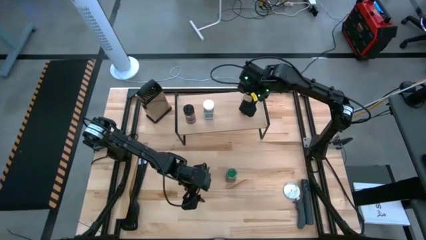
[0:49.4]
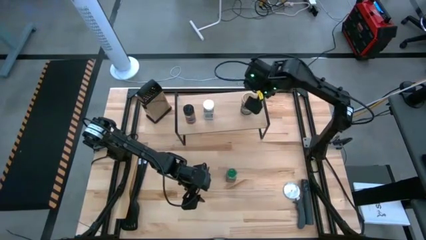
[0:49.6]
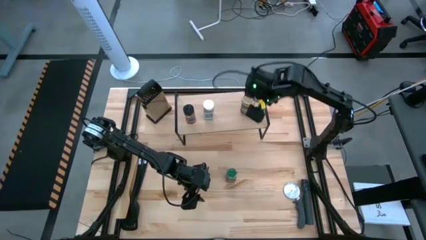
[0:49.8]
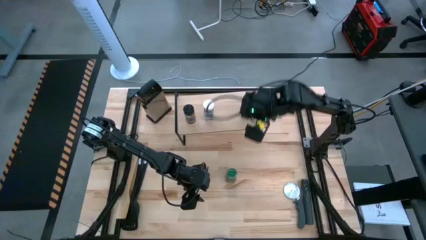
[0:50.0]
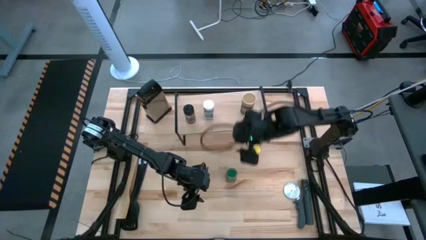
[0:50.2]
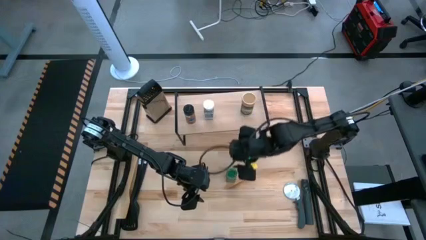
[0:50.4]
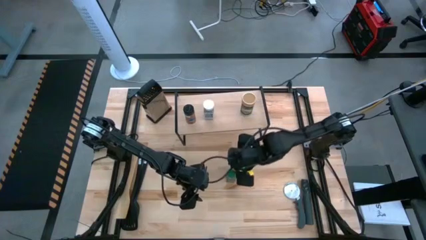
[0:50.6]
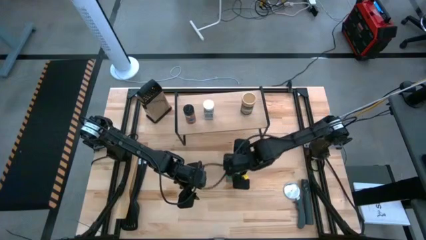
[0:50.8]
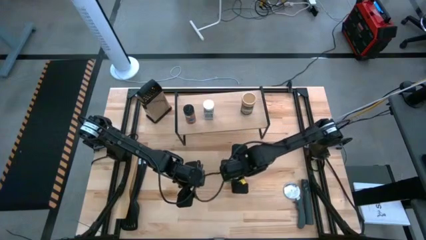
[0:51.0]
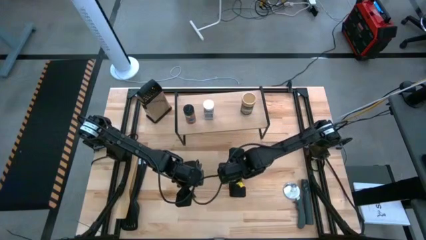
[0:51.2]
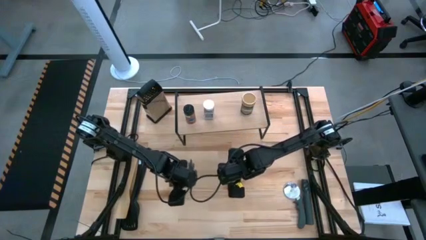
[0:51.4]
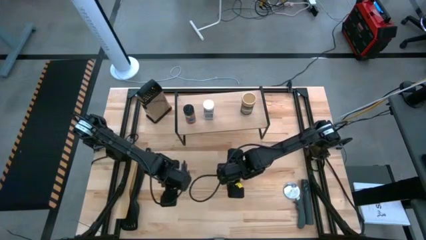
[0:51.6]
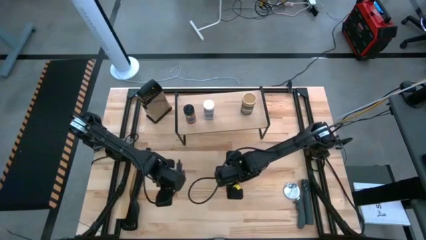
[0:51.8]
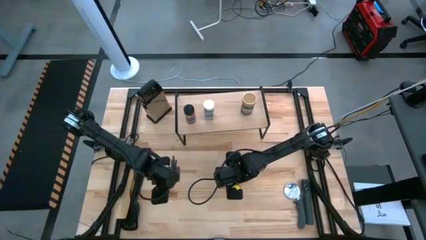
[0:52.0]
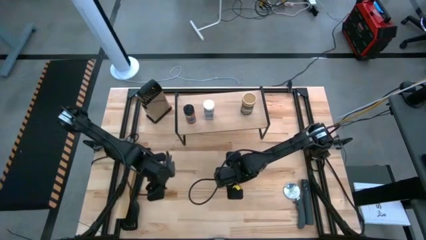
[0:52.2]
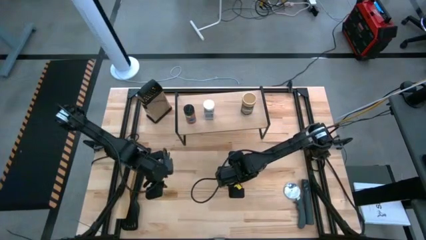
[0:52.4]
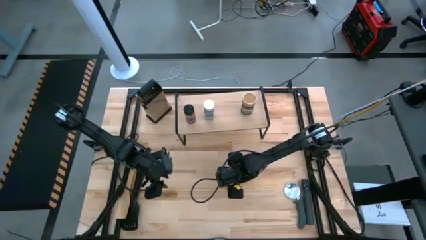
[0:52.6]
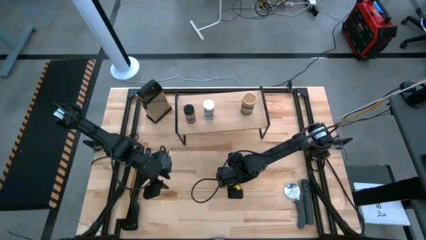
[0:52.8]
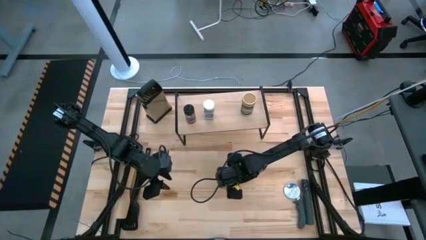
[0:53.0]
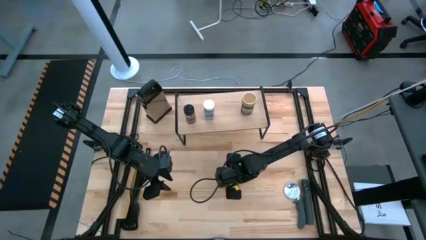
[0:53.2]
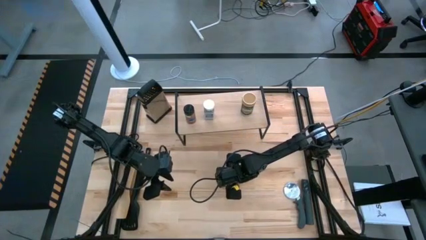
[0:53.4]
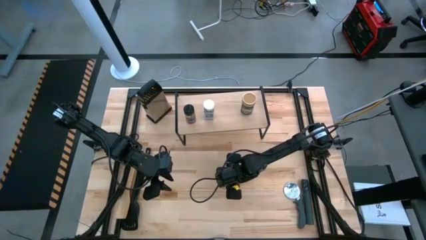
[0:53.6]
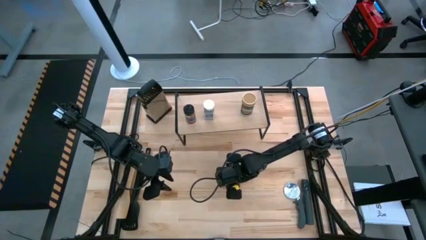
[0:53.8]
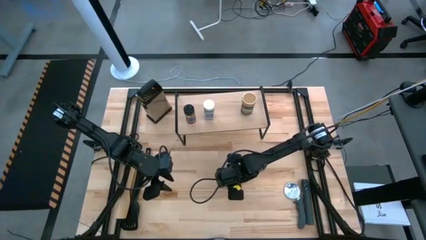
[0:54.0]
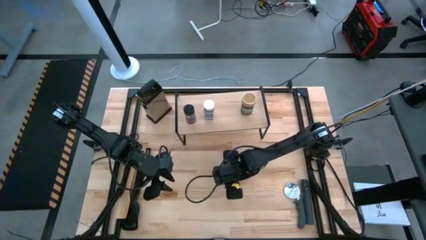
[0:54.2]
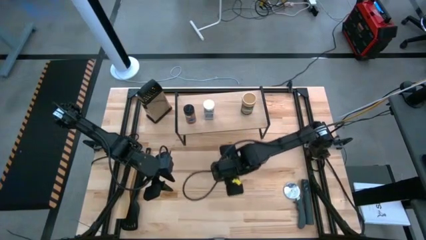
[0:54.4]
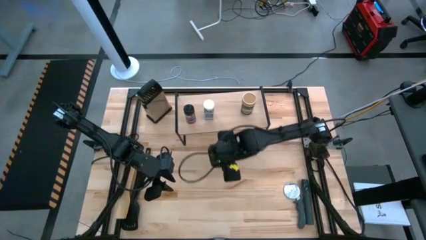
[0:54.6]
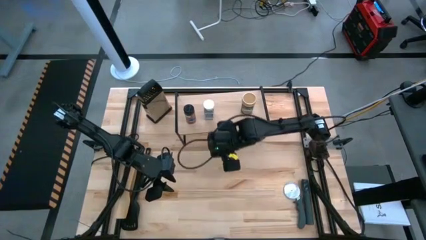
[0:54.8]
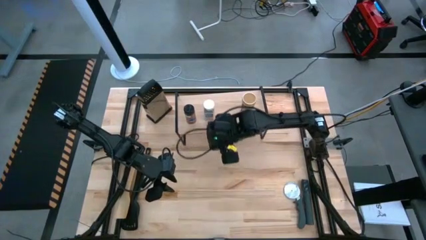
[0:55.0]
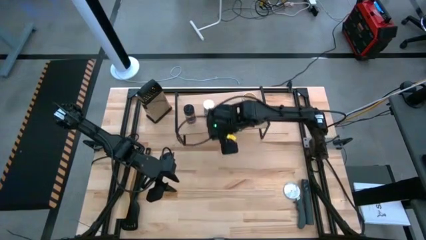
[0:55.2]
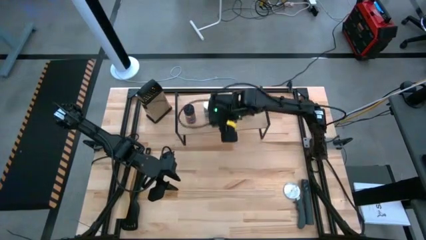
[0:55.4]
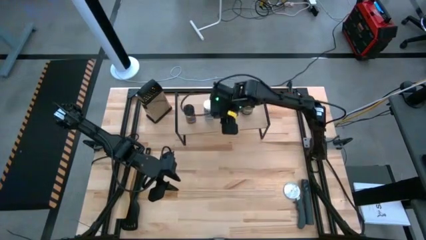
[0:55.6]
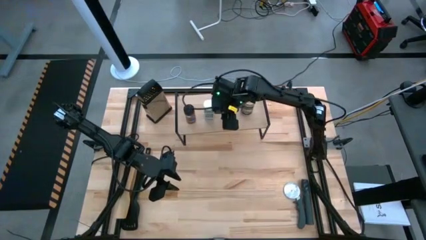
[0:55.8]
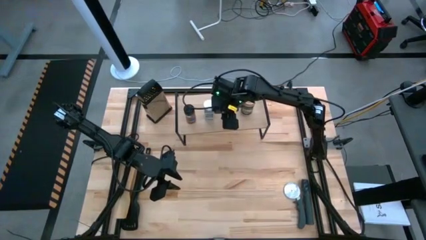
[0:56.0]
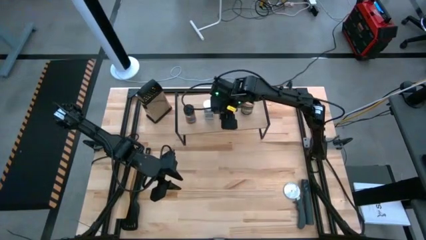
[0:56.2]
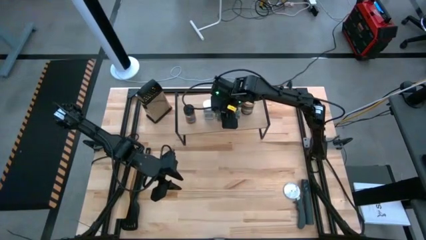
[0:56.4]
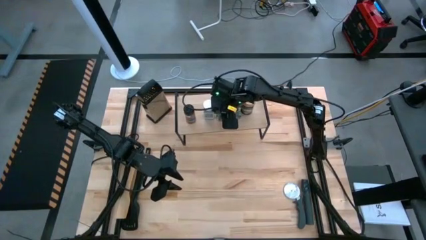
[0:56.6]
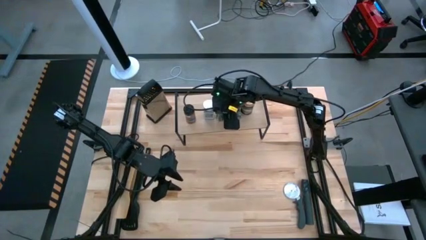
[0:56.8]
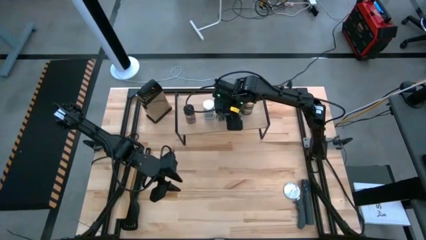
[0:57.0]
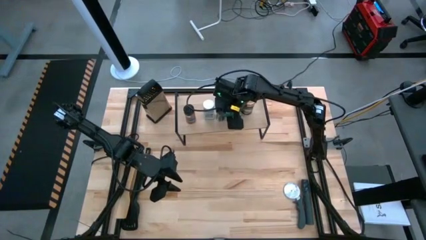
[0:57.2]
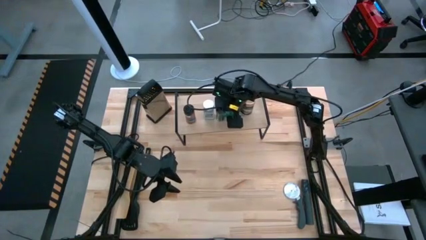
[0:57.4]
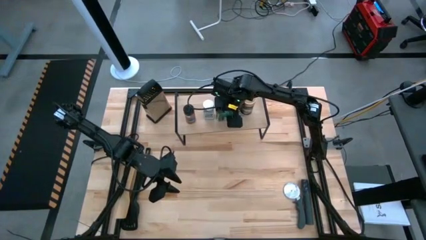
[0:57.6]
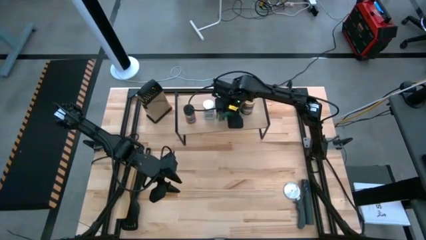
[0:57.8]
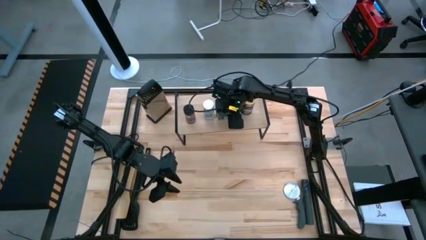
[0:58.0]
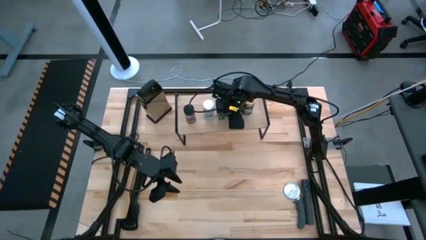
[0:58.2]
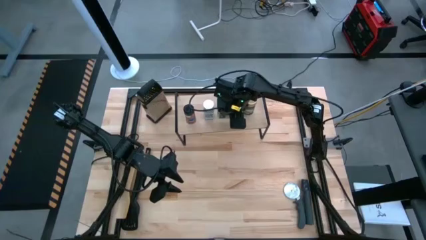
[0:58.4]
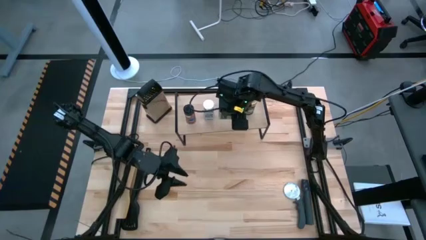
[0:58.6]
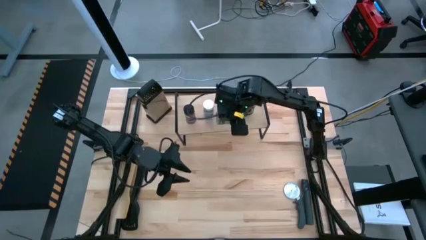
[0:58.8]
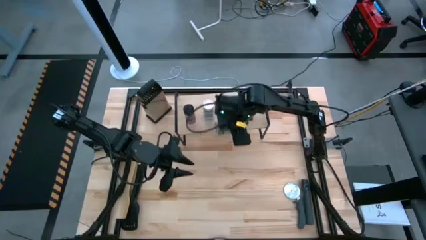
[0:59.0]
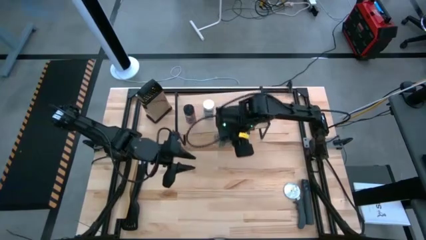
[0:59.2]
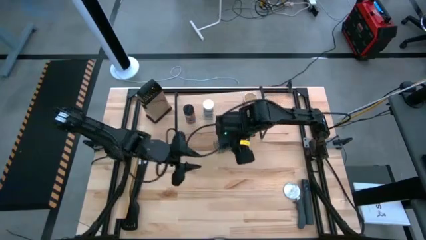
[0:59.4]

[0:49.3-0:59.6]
Task: Shelf spices
Put the green seasoning bottle on the shelf

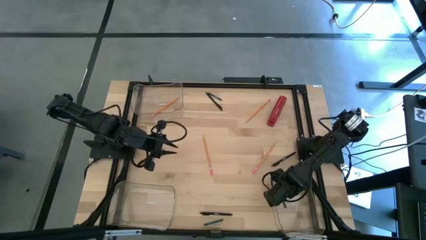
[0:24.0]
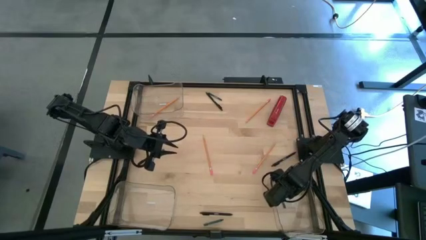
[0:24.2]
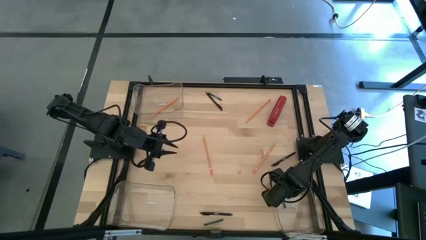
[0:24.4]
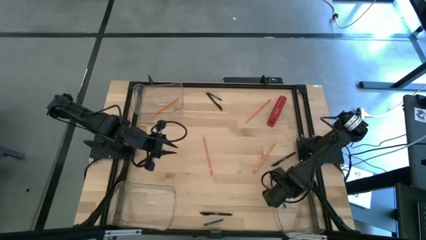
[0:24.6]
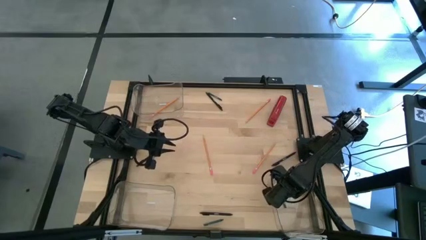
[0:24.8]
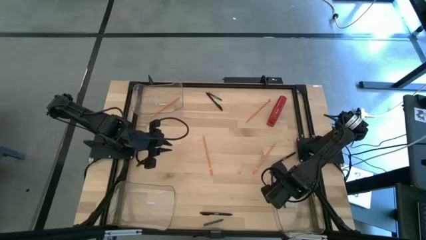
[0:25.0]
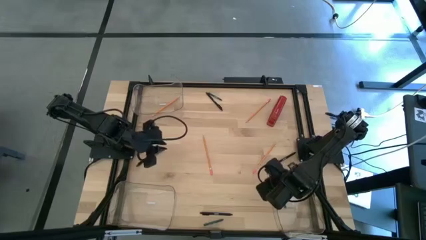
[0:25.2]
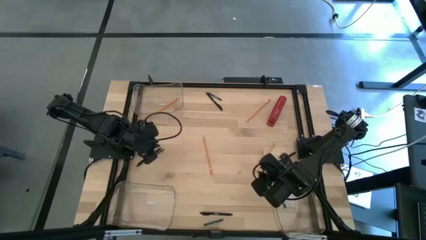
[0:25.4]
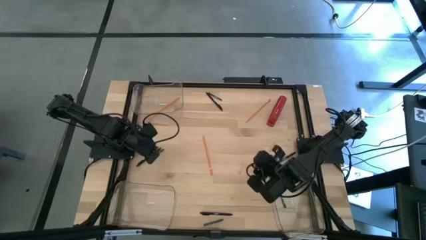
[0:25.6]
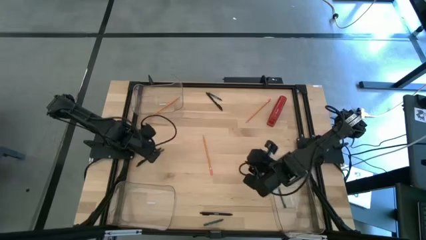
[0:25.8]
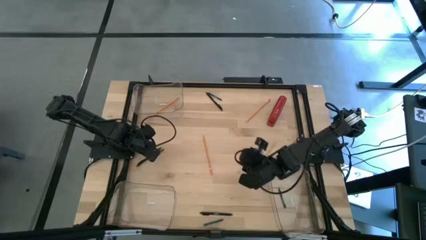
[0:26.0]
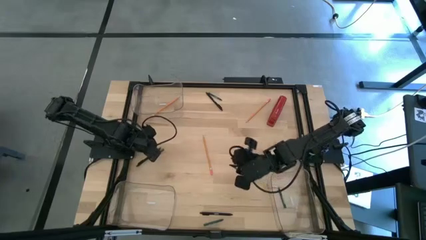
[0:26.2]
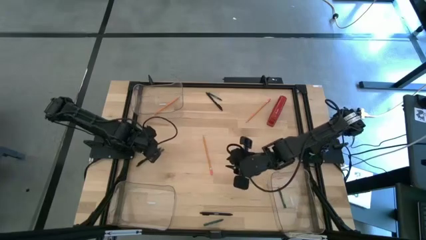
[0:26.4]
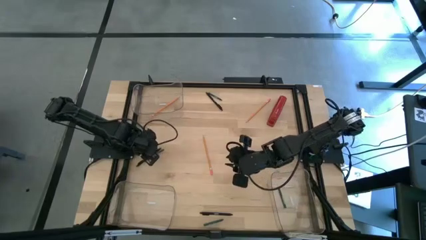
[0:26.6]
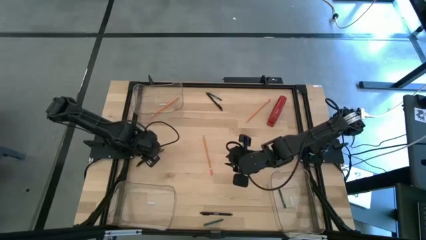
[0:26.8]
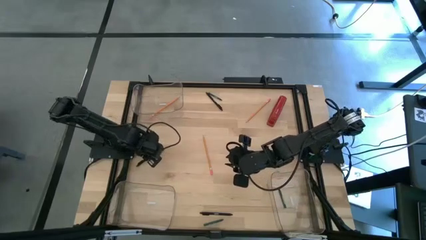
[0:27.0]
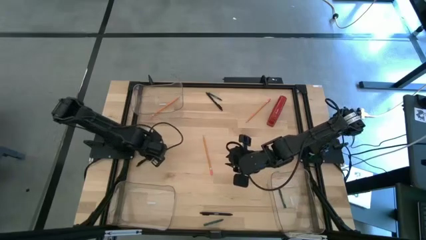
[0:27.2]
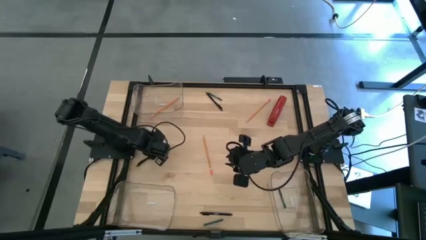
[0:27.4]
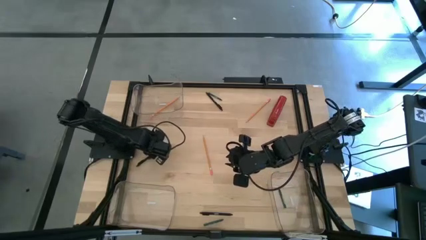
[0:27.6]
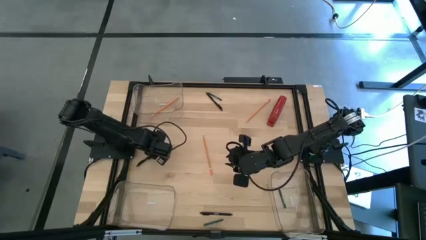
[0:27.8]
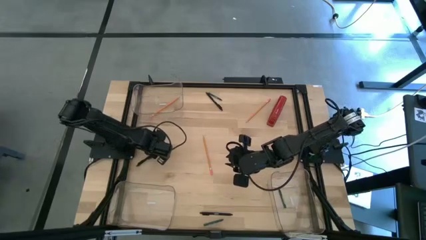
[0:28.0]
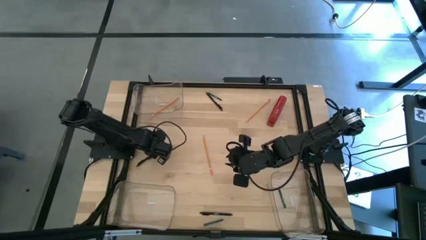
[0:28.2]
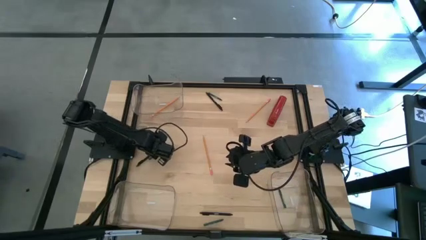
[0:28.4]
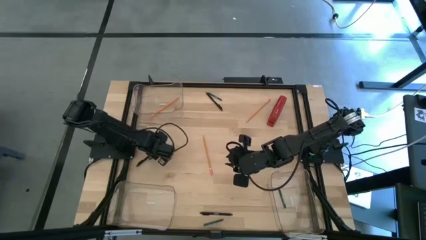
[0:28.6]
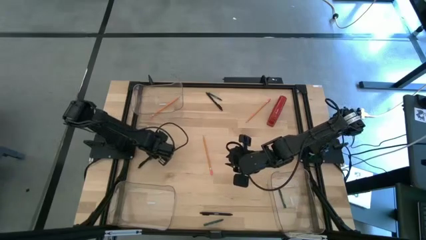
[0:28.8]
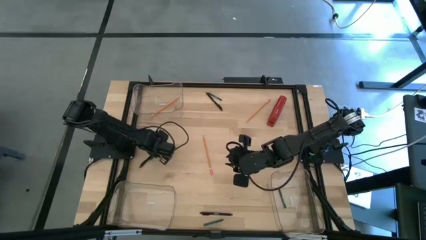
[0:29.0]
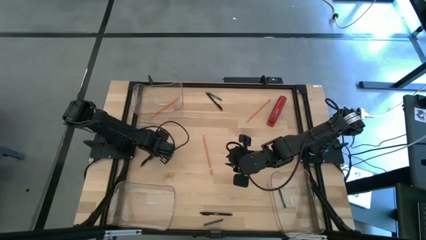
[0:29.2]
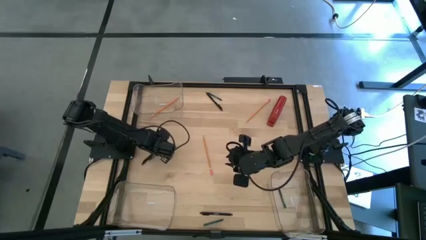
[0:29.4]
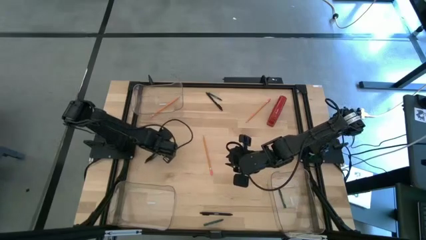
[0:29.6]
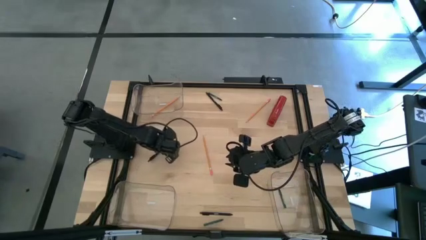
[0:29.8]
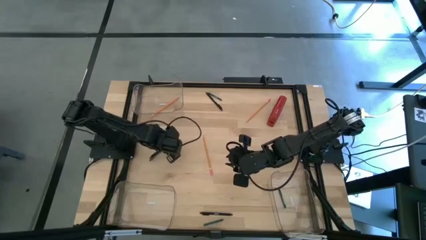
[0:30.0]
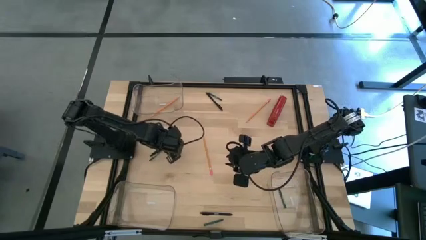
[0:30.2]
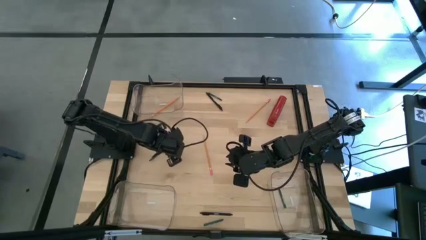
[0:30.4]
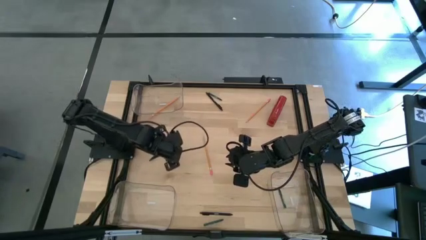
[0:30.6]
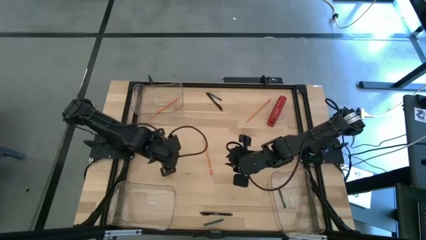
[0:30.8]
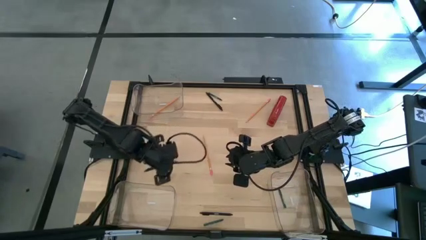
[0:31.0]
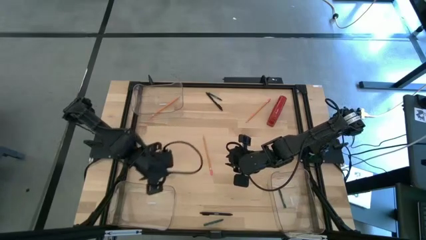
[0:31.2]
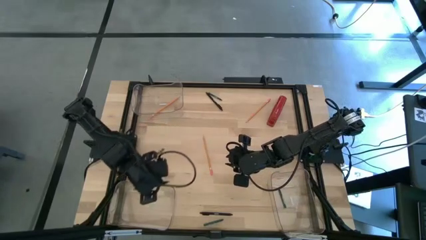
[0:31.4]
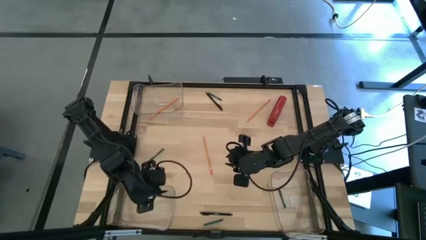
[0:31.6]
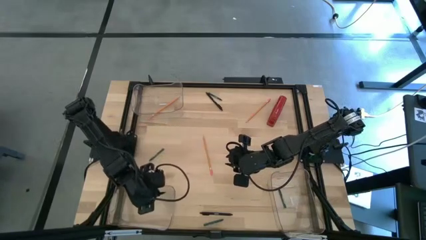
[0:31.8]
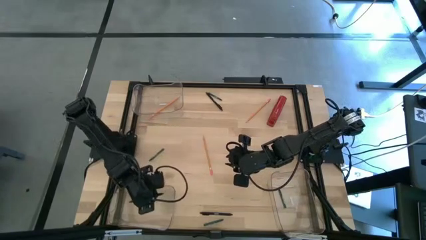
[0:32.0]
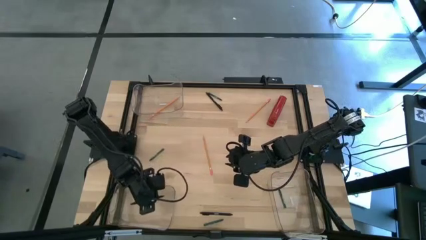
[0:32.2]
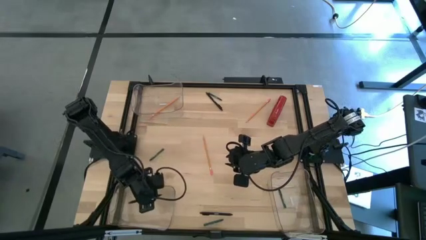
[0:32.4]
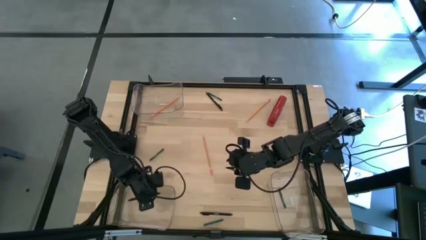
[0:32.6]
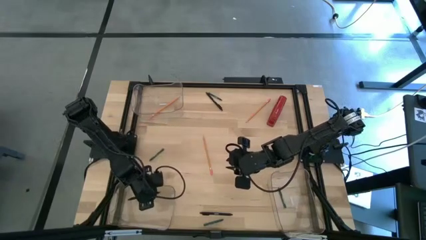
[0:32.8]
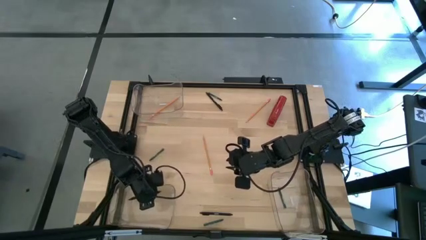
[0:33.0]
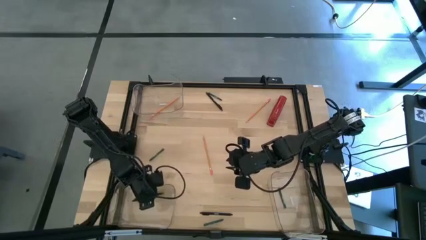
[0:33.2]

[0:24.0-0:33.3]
Task: Sort crayons/erasers/pens/pencils in bins
Put the black pen into the bottom left transparent bin
